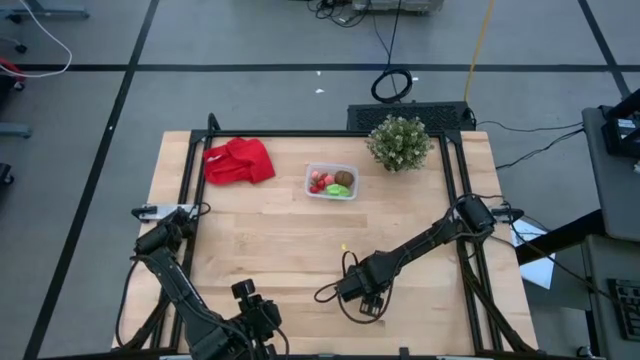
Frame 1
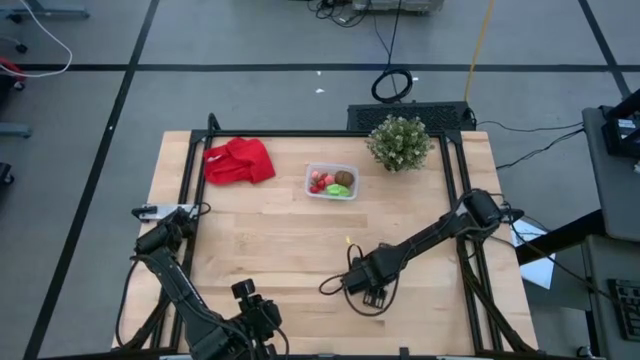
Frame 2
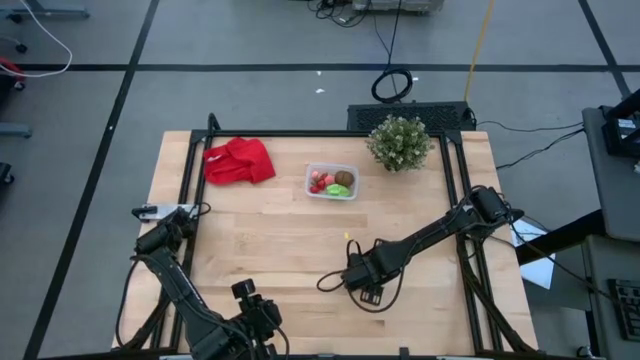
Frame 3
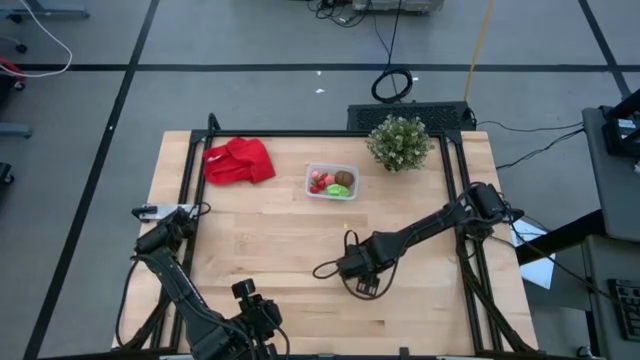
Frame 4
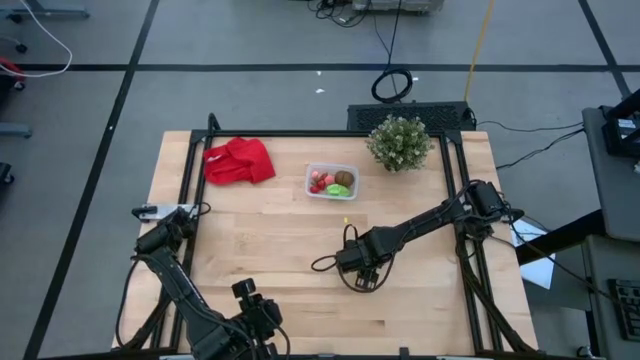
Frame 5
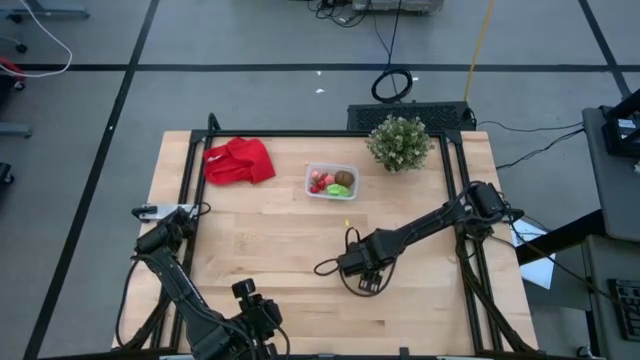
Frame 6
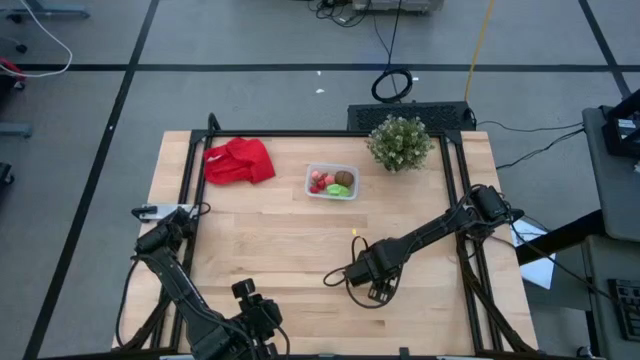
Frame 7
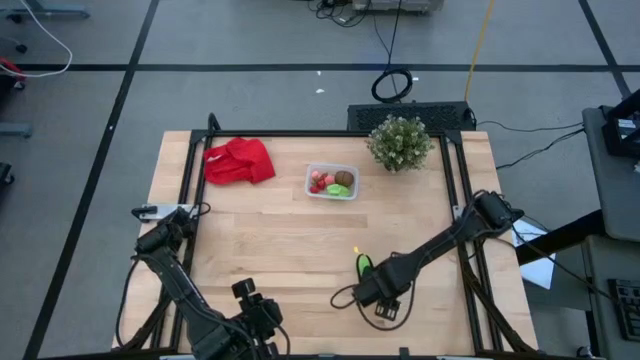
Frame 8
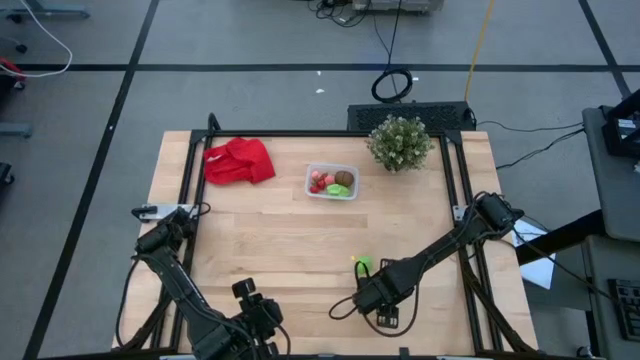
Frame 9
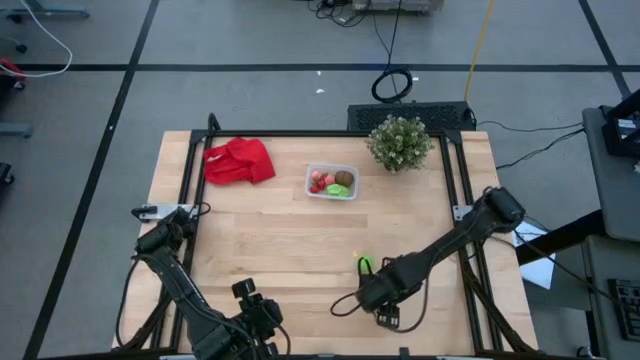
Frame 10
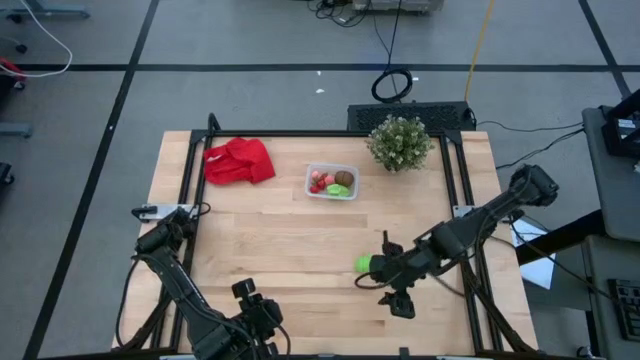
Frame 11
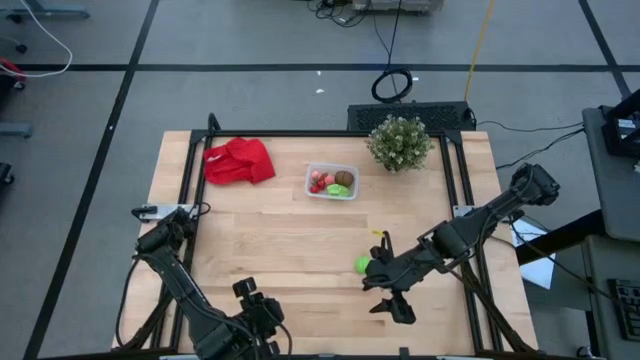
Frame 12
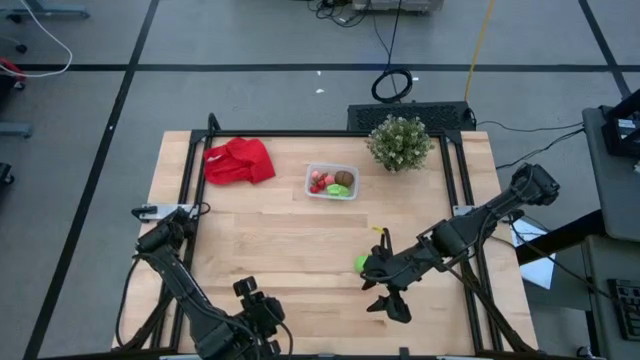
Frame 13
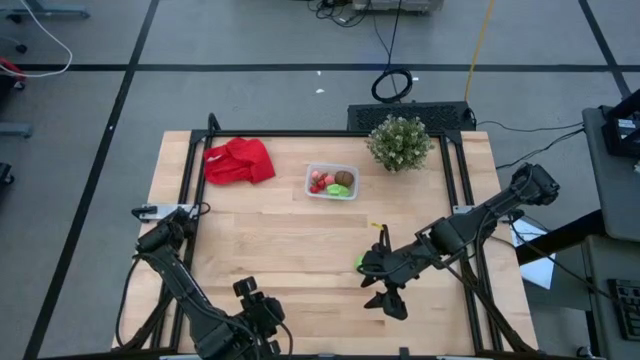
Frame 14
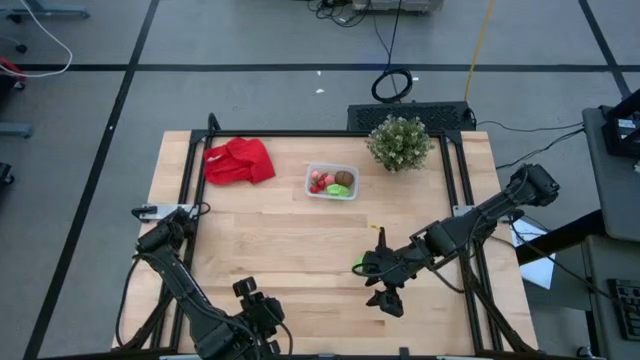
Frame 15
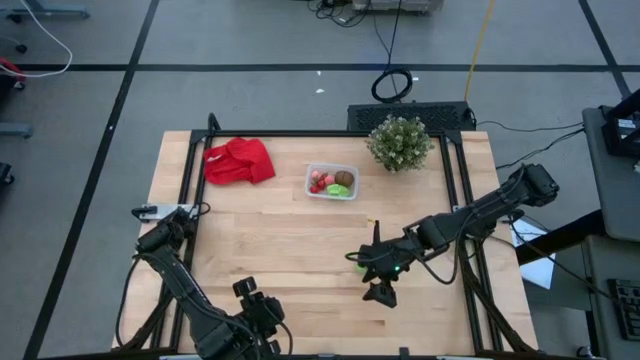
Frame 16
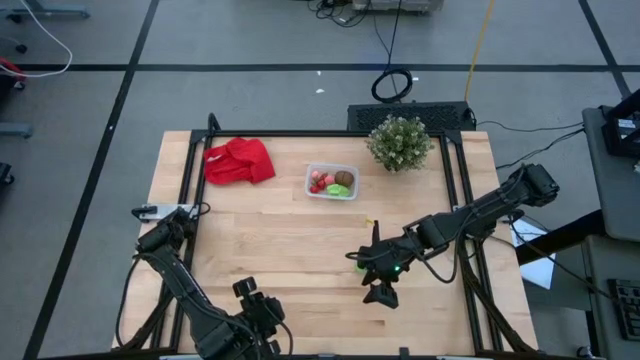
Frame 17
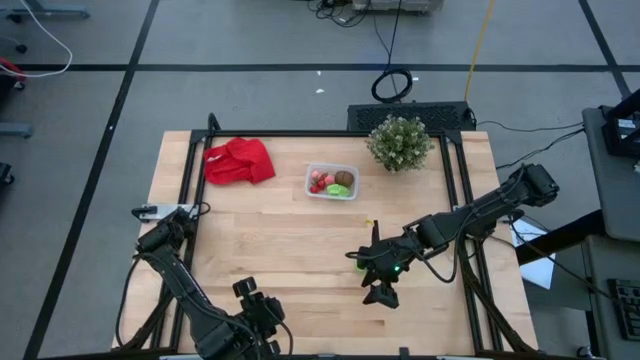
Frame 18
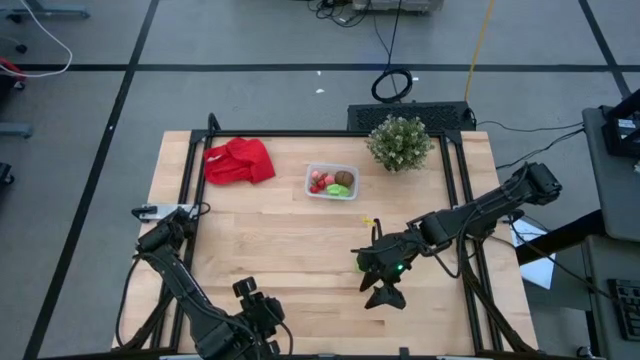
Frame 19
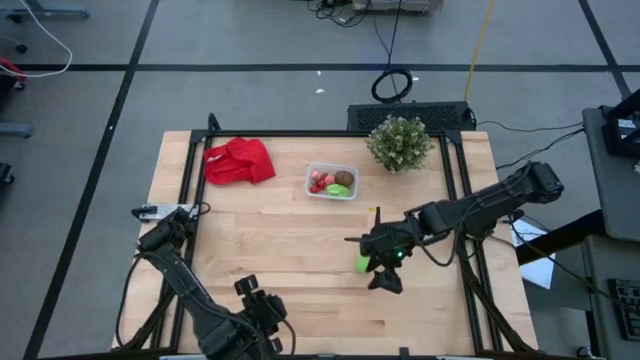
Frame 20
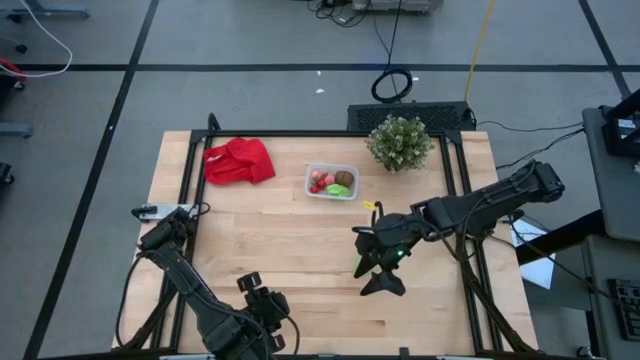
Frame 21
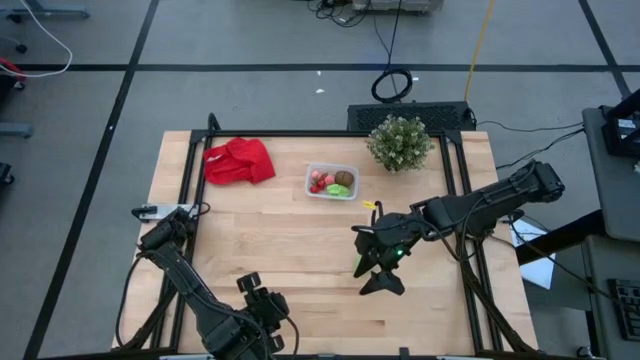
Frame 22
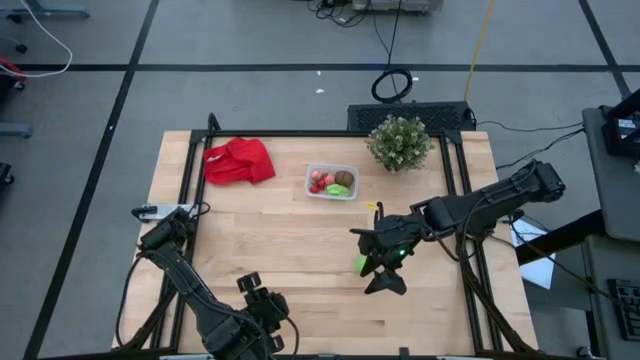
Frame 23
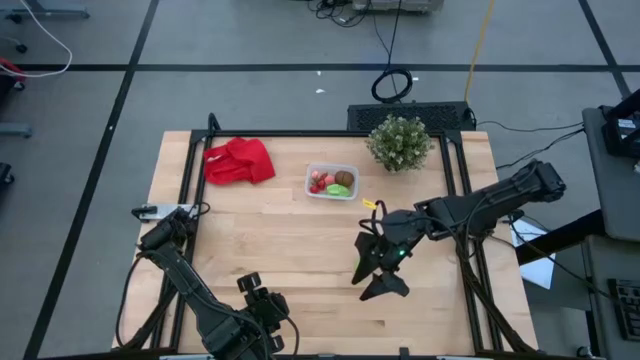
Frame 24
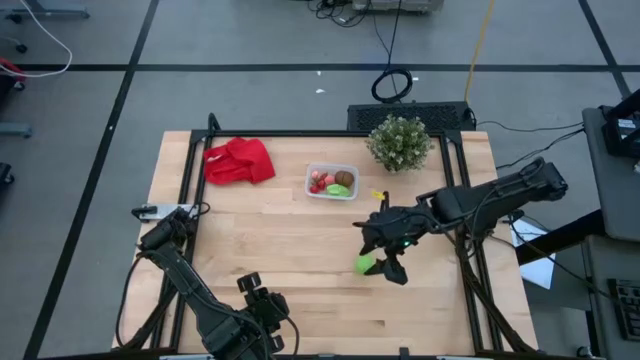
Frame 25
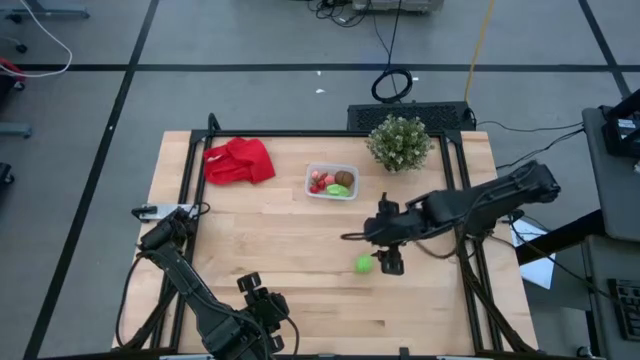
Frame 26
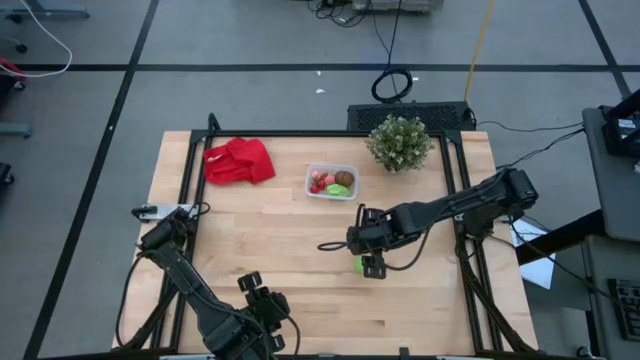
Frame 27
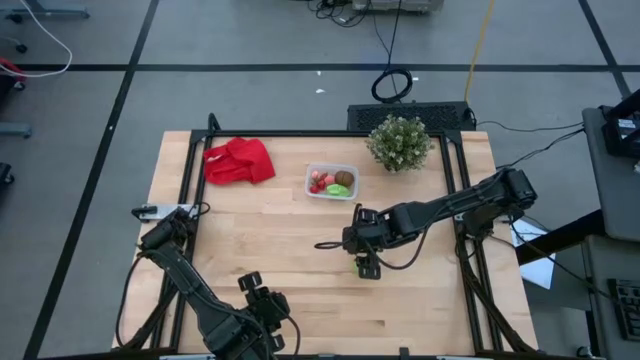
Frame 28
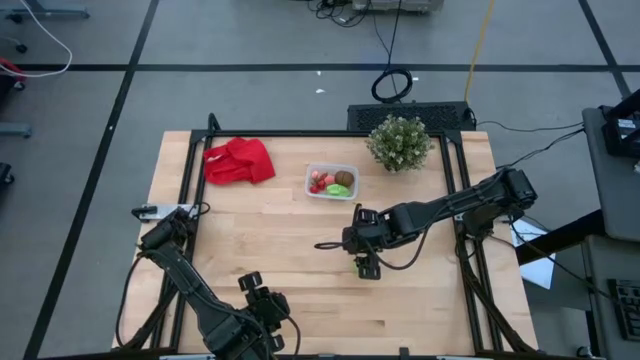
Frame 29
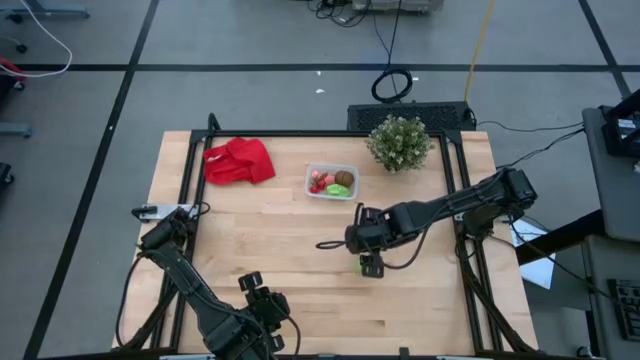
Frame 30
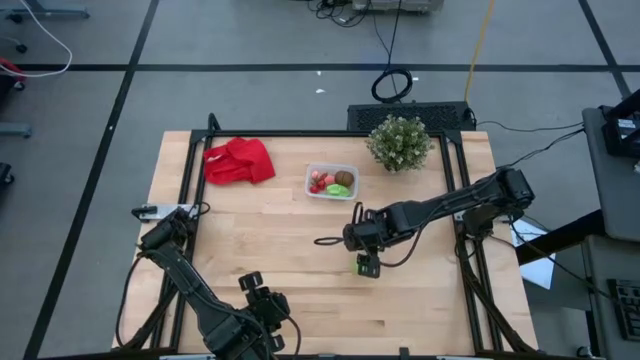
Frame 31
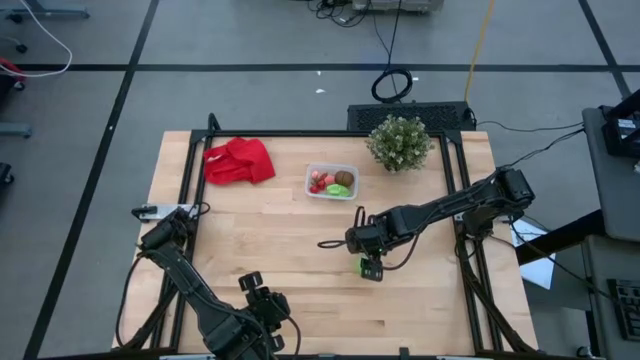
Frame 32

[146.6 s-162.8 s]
Task: Pick and placing Produce into tupperware
Put the cabbage into the bin

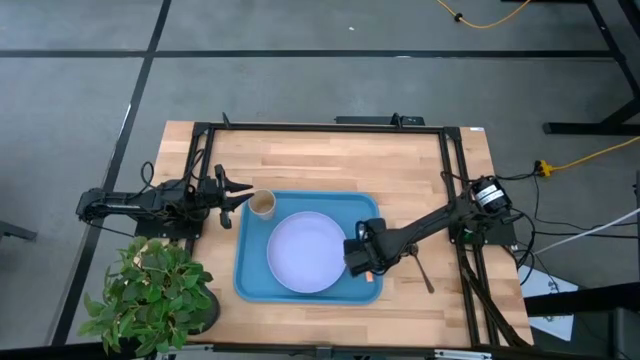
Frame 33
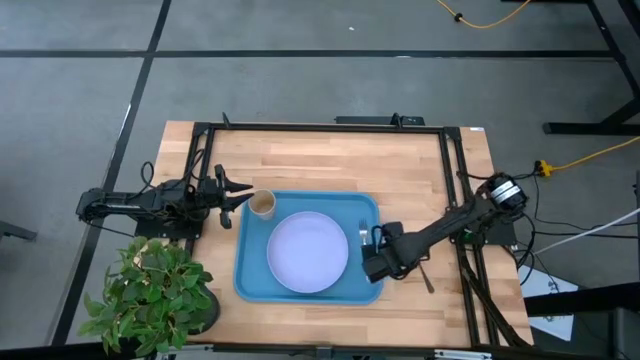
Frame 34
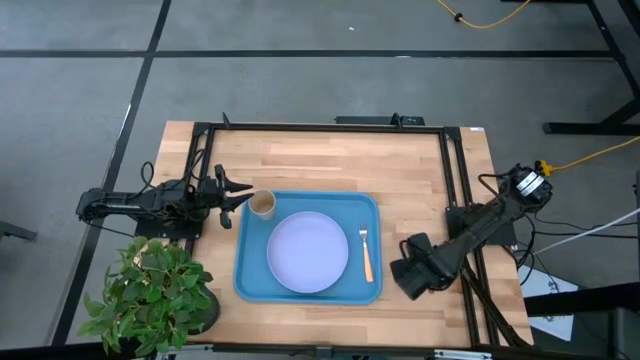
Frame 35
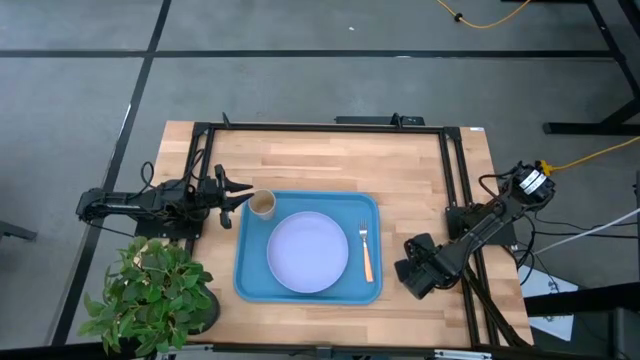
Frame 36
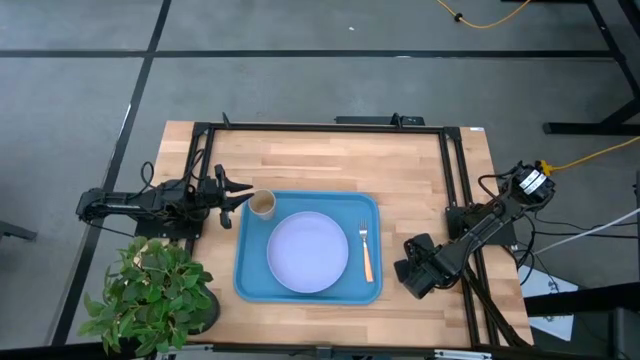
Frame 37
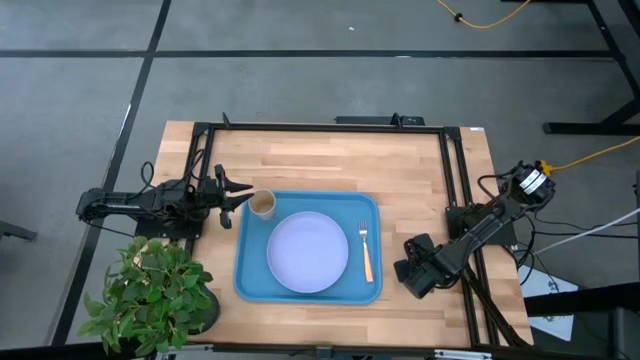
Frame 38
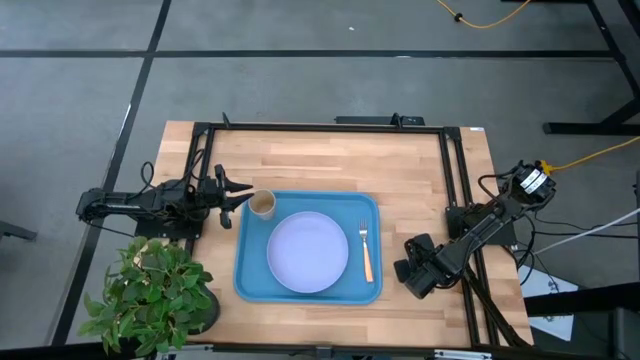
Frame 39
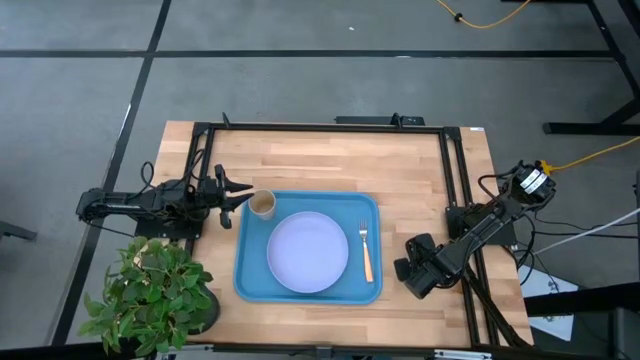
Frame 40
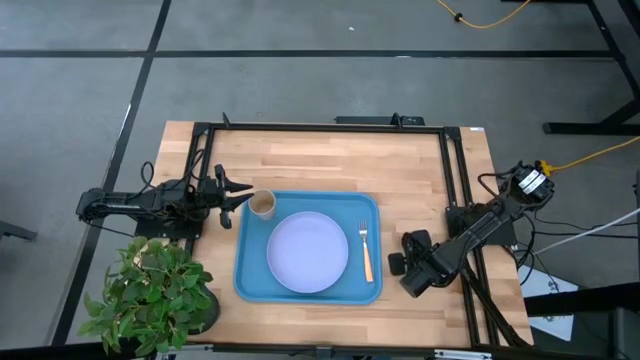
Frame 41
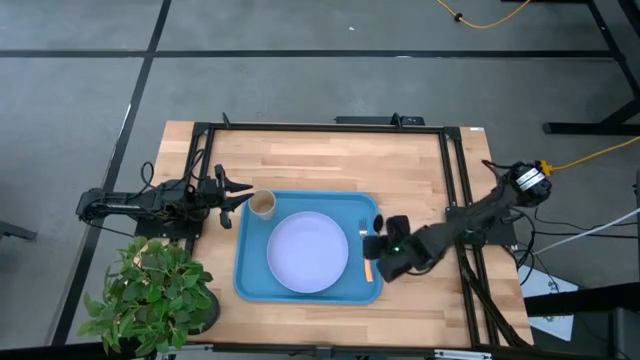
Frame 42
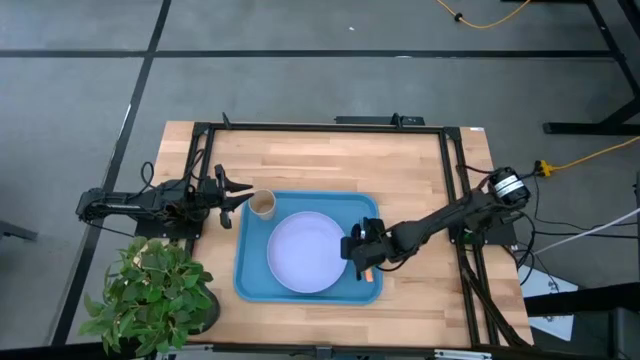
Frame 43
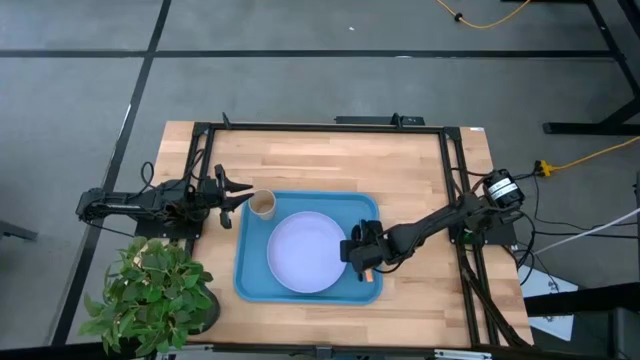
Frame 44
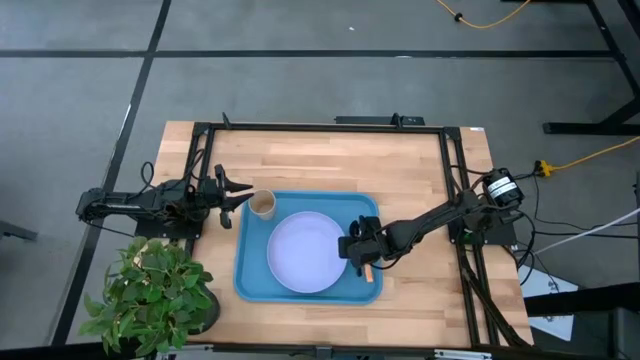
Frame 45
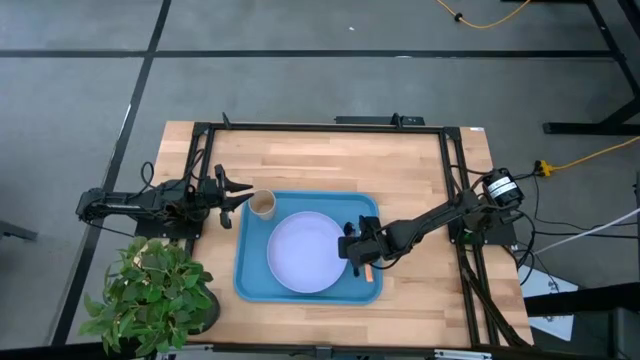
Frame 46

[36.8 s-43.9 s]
Task: Pick and place plate/cup/fork/spoon on tray
Put the black spoon on the blue tray to the right of the purple plate
